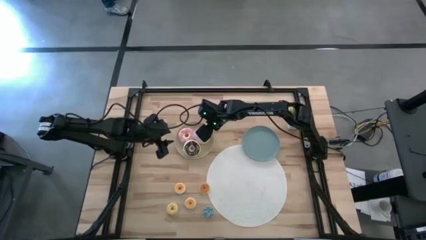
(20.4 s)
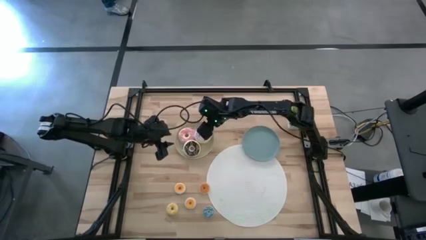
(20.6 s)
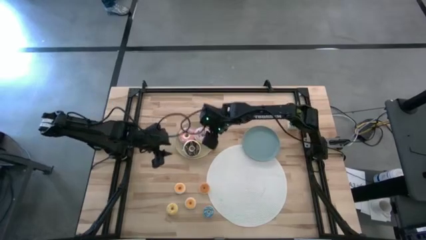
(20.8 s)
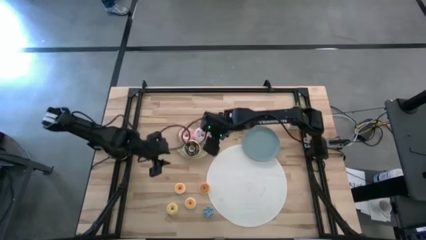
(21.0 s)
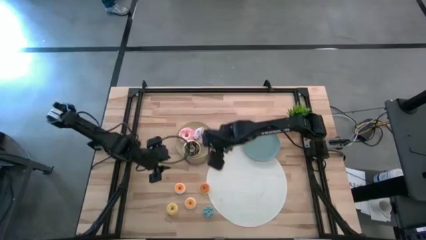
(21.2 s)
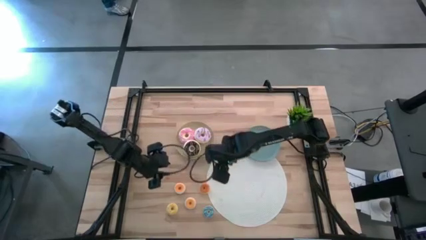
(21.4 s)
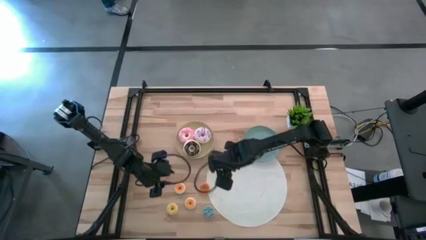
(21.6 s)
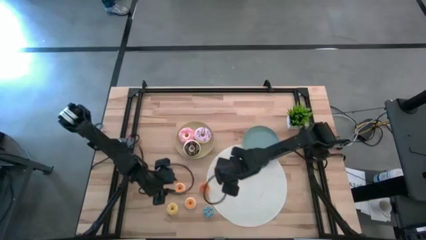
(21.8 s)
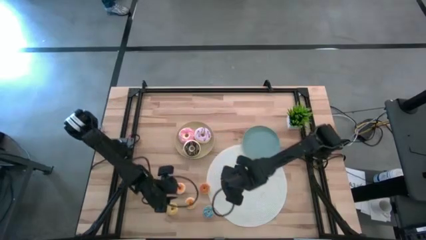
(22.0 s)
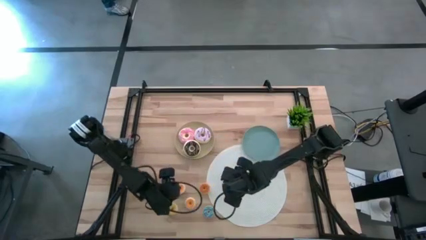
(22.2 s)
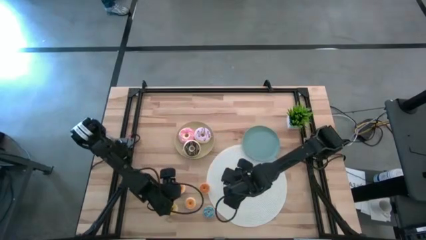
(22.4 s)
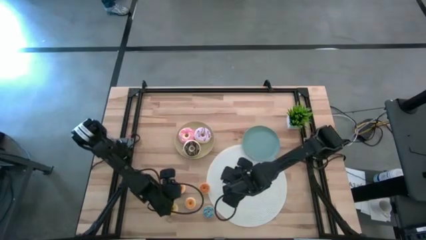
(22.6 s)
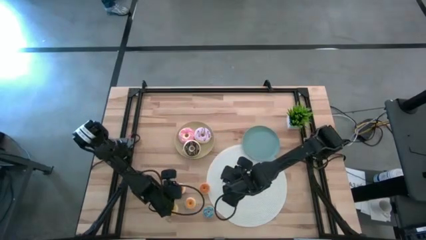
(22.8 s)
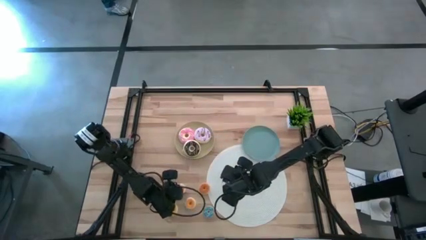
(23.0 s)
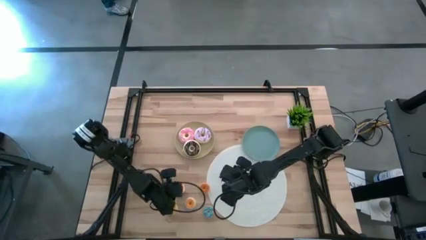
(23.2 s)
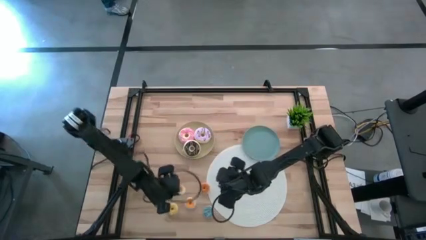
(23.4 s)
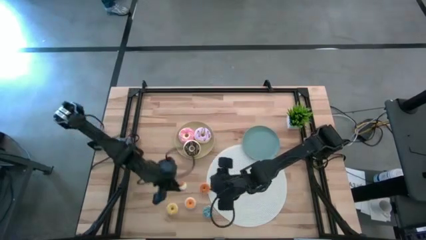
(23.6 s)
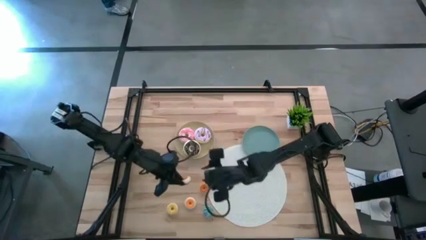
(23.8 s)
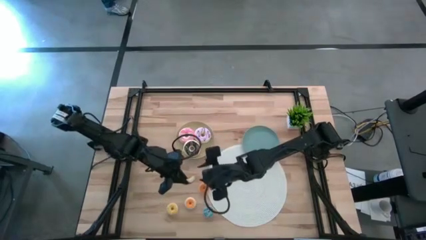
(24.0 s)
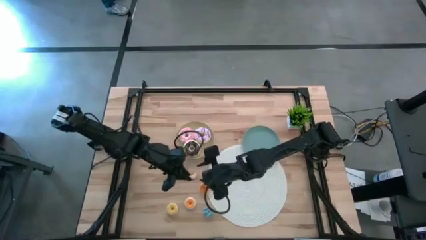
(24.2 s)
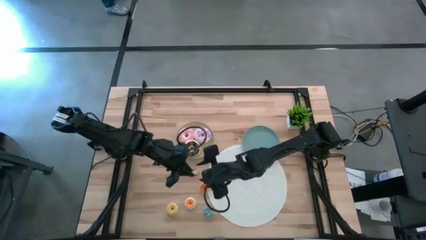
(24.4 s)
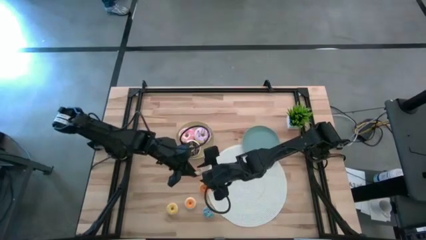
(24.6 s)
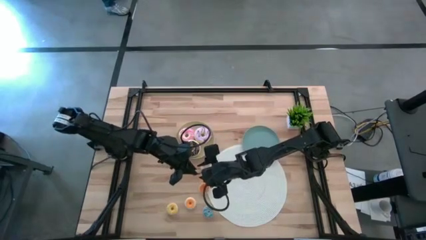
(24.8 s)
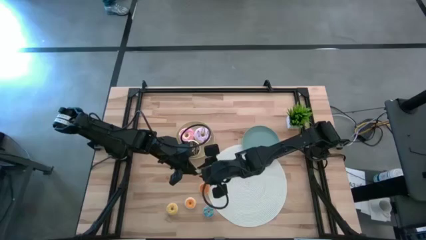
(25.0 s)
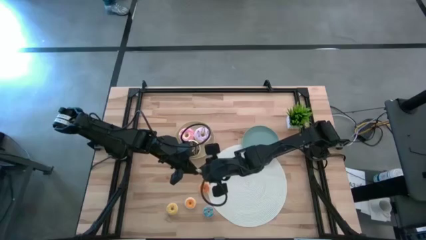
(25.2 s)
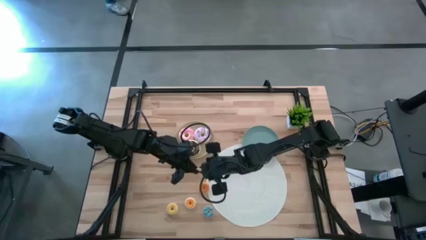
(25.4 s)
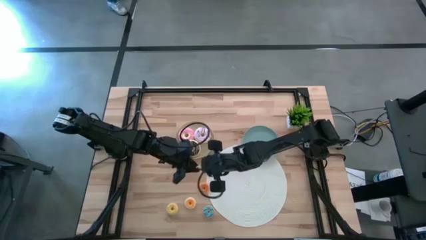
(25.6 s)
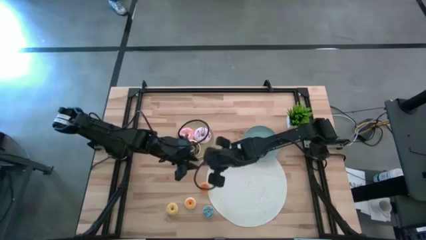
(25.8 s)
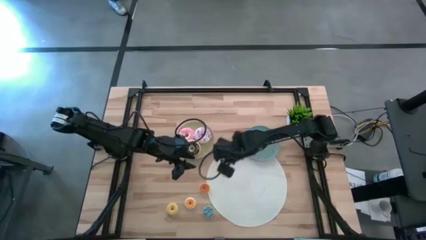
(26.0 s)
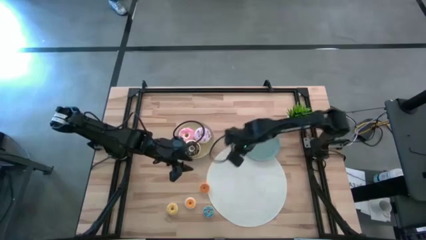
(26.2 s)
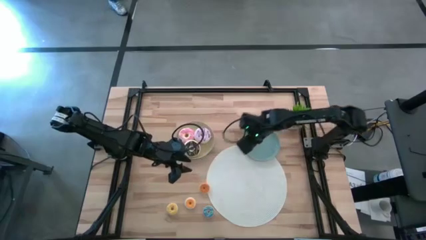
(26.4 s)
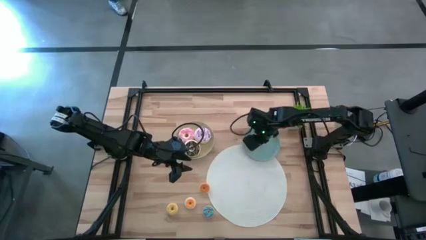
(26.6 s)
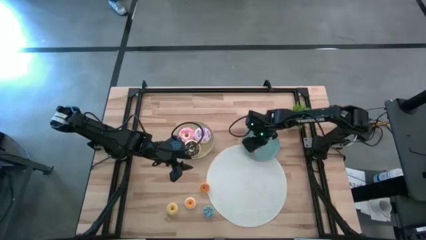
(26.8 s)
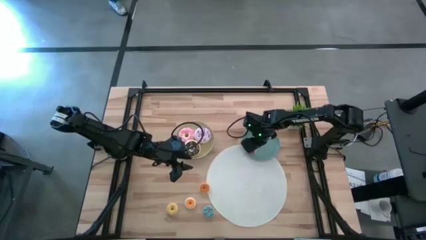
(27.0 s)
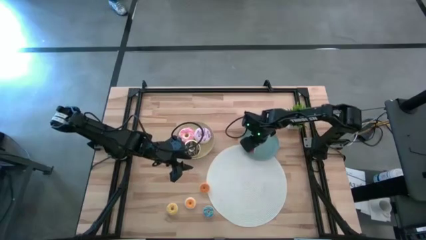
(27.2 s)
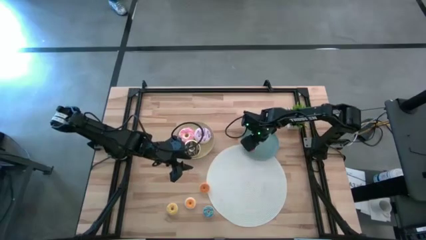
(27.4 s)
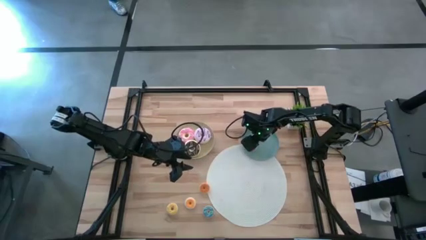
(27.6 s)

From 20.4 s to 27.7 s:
Task: Pick & Place donuts
Put the small red donut on the blue plate

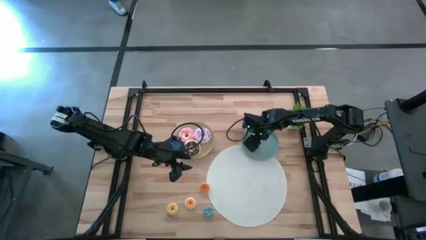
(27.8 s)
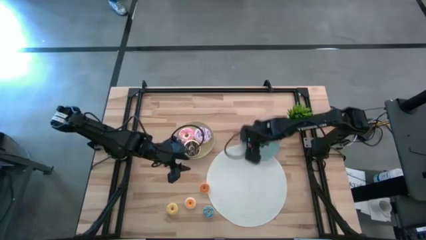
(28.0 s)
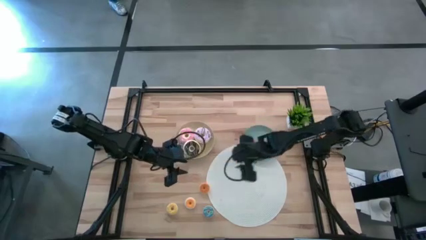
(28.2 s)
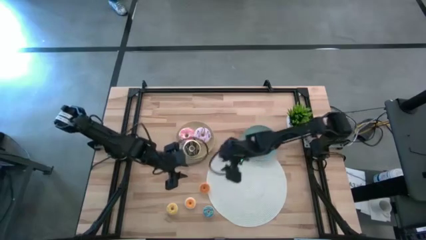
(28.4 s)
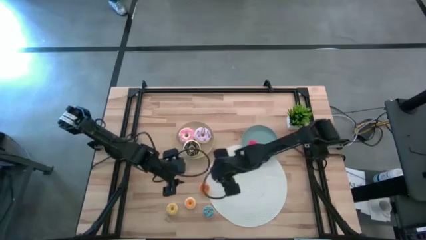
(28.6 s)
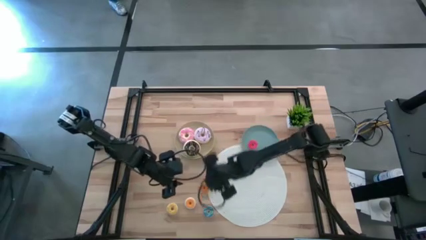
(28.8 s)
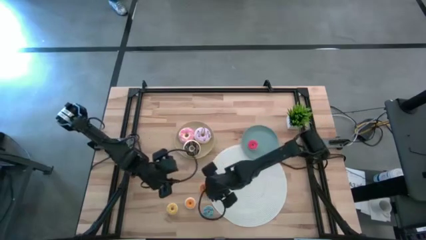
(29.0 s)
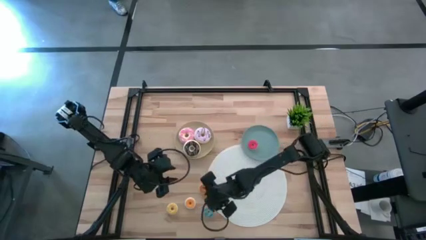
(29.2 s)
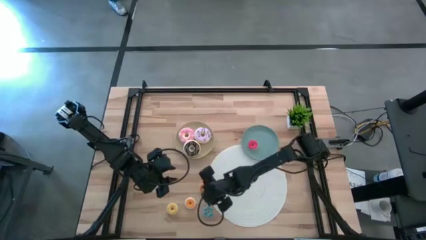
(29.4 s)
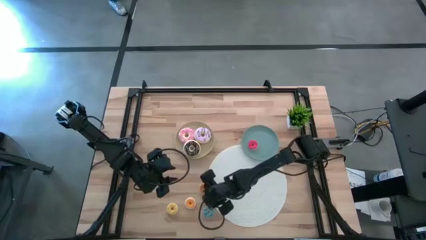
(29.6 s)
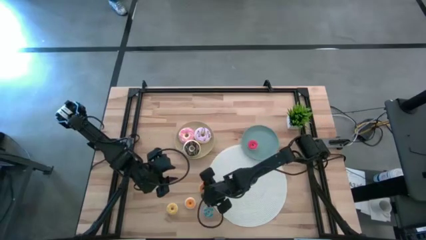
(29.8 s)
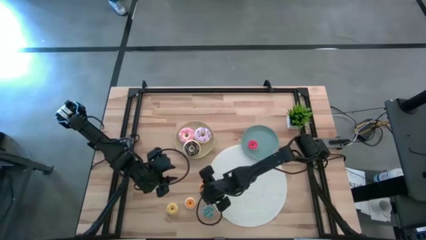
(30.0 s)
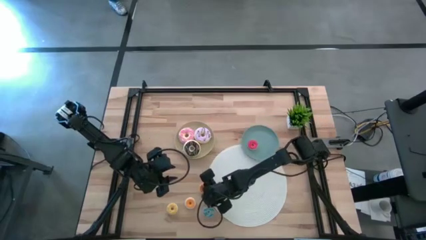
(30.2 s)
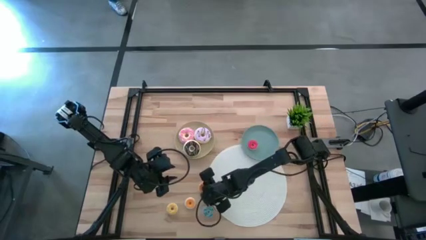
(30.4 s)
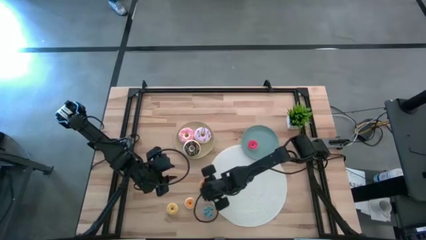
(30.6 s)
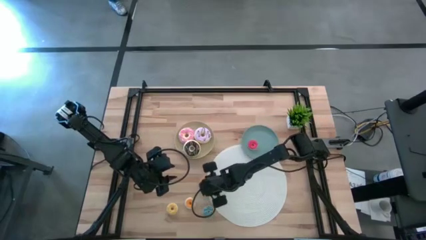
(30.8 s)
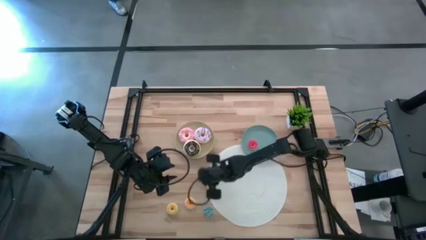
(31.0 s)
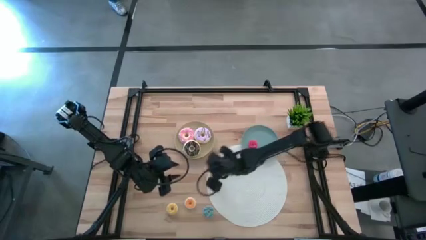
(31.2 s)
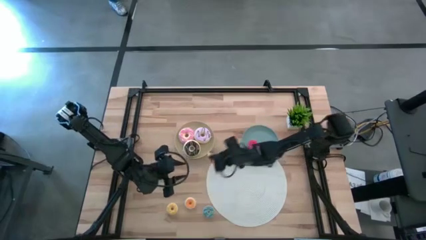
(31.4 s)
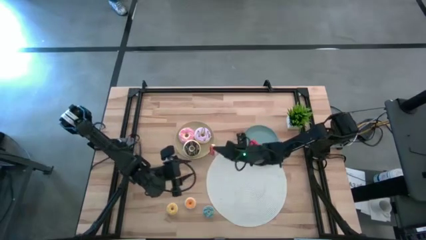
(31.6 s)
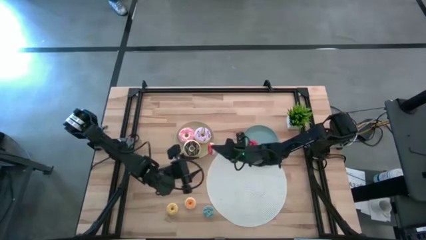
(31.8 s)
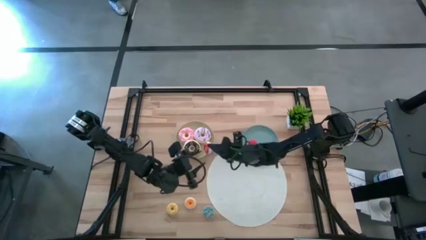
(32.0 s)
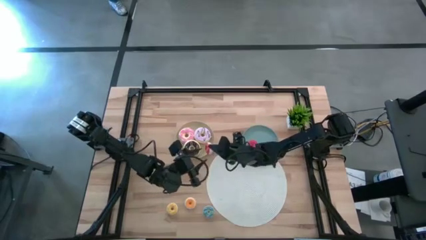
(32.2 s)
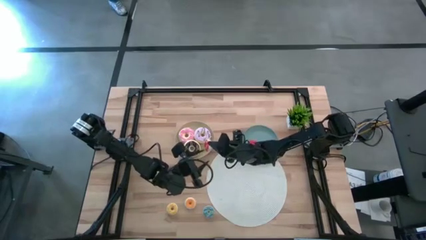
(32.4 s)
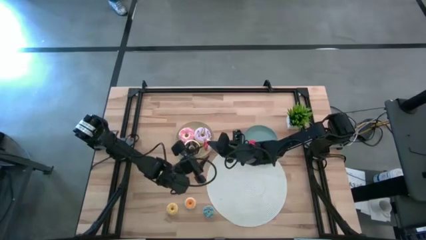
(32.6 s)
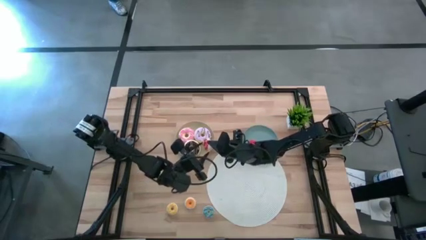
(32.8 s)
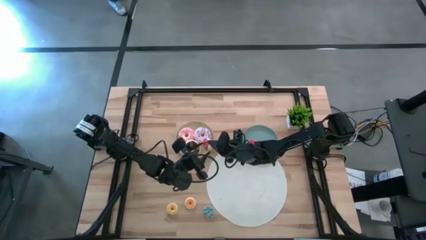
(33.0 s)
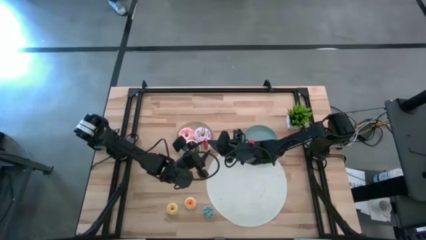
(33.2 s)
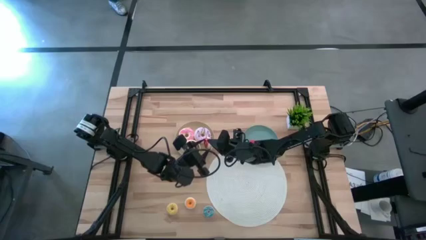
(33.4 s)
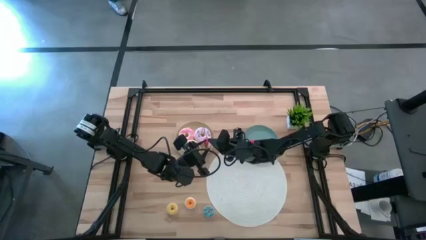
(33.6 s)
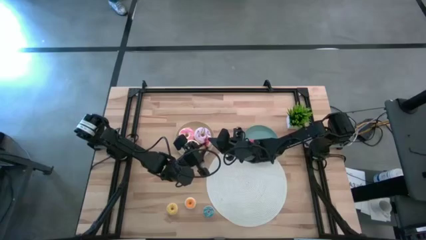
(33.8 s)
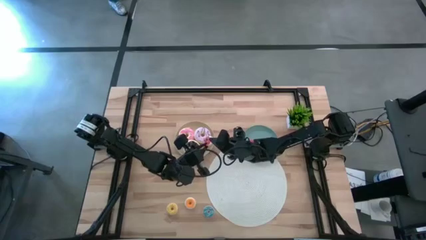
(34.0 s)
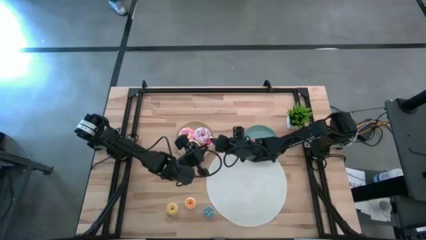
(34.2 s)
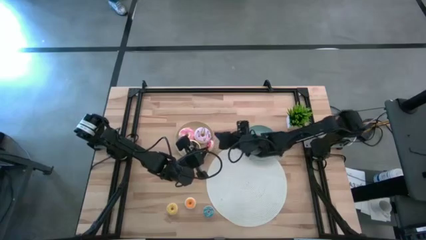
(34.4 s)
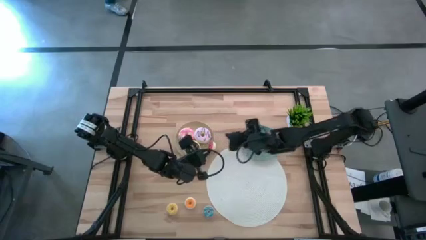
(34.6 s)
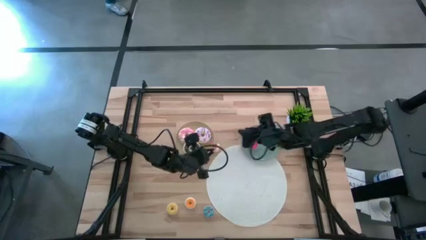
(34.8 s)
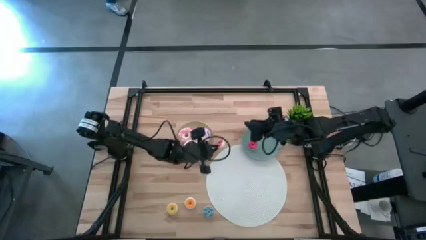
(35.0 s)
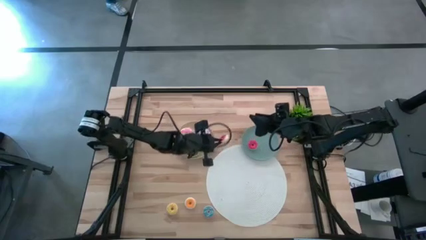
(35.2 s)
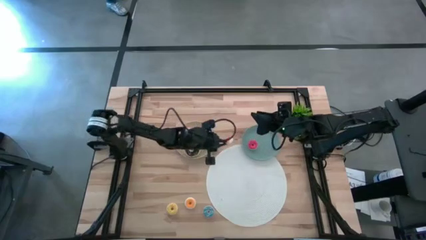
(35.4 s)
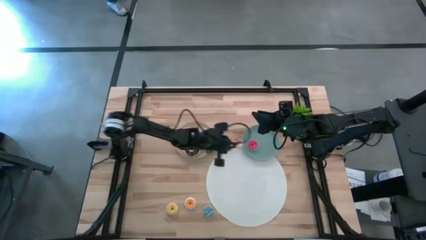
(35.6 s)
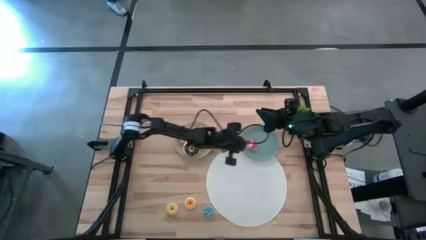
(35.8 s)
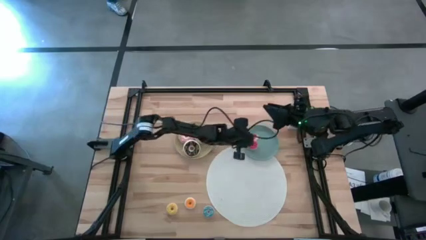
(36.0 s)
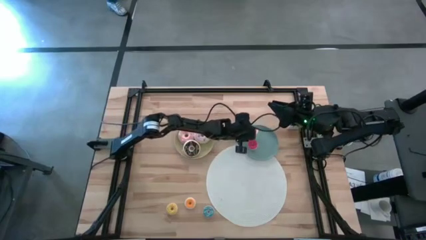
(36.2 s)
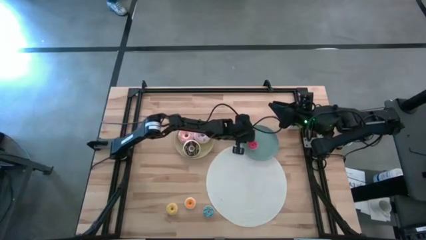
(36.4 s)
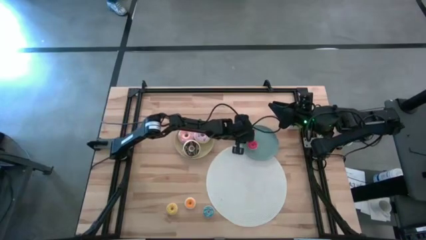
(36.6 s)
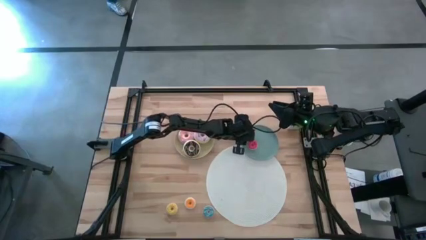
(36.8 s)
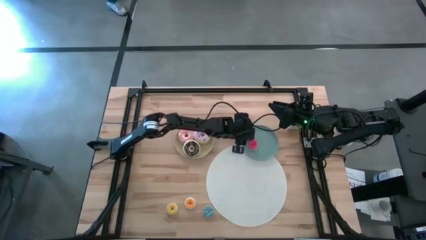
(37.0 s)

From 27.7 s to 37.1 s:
Put the top small orange donut on the blue plate
